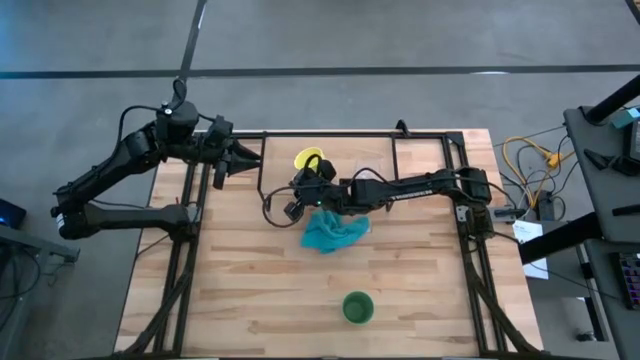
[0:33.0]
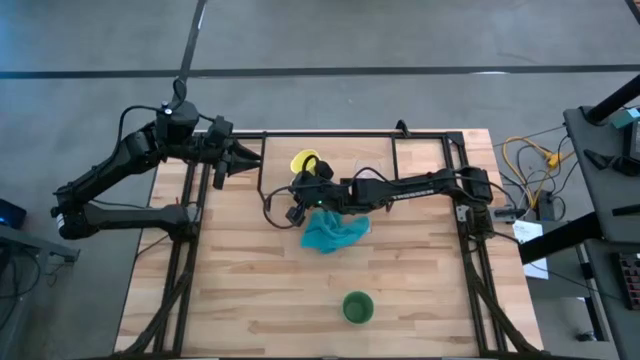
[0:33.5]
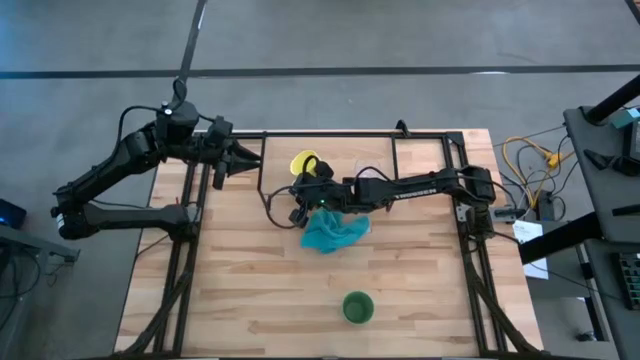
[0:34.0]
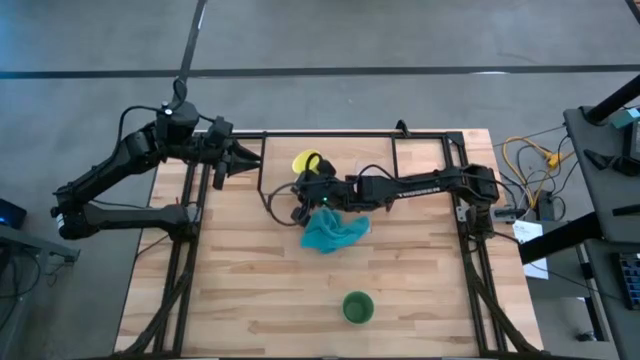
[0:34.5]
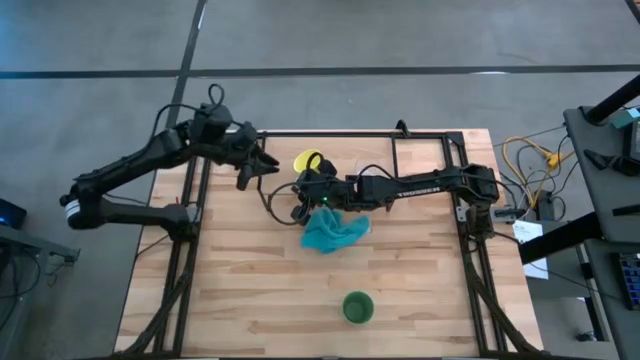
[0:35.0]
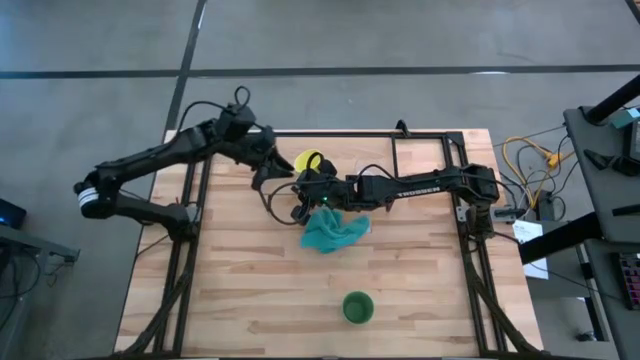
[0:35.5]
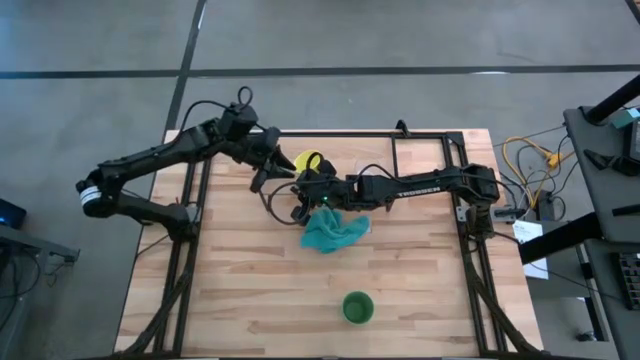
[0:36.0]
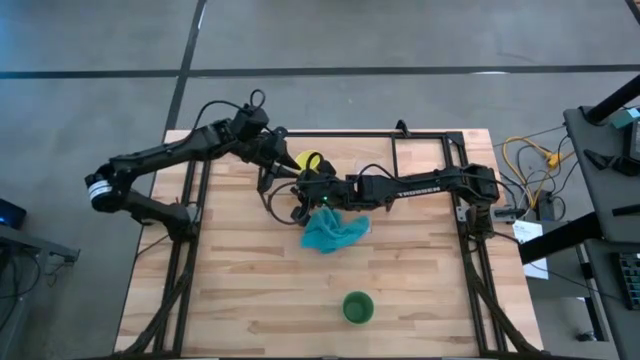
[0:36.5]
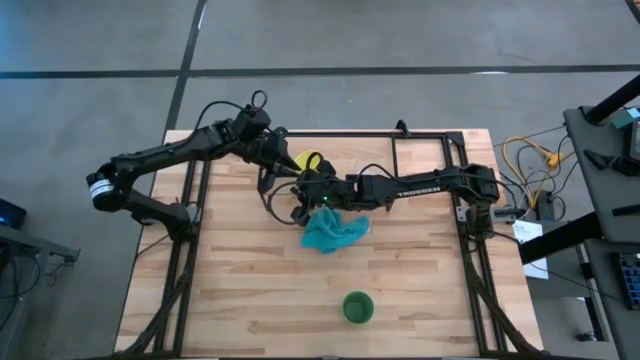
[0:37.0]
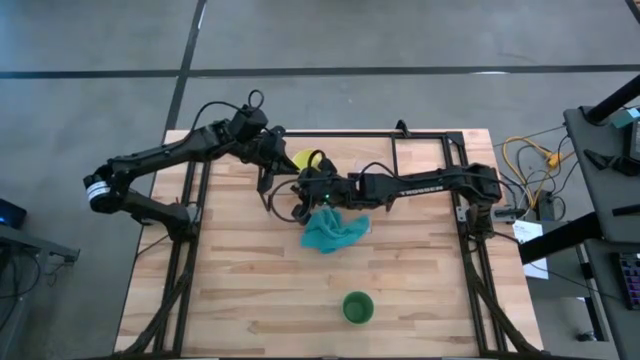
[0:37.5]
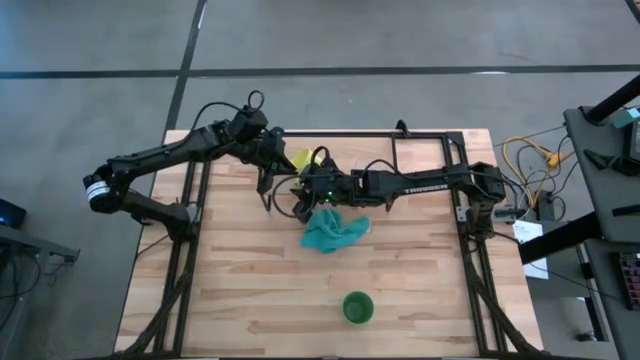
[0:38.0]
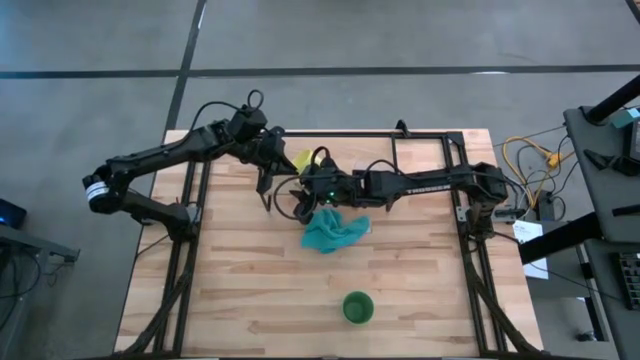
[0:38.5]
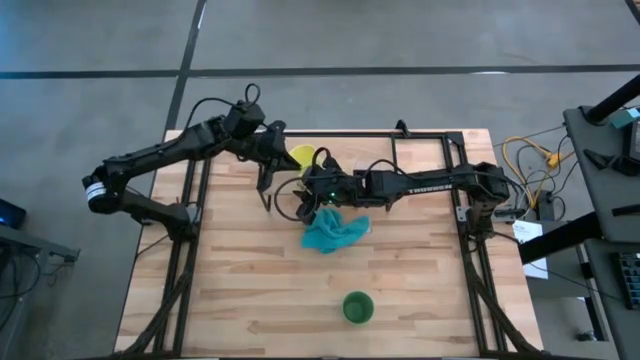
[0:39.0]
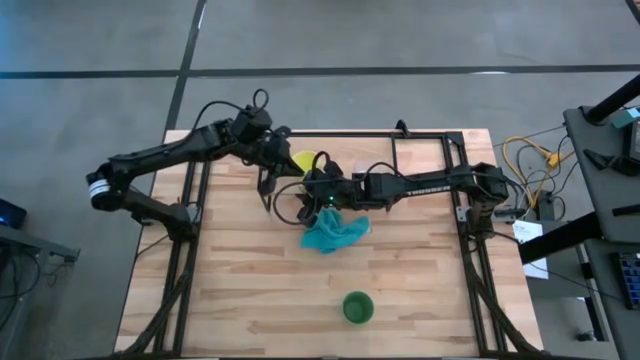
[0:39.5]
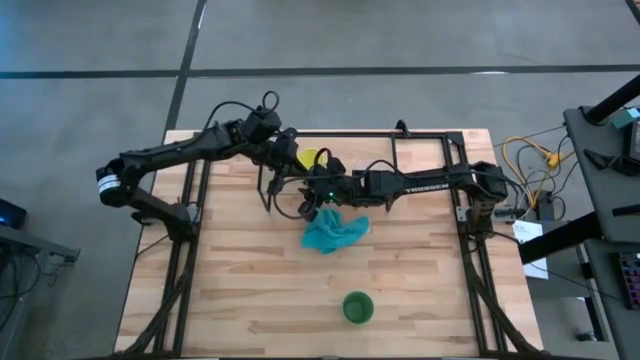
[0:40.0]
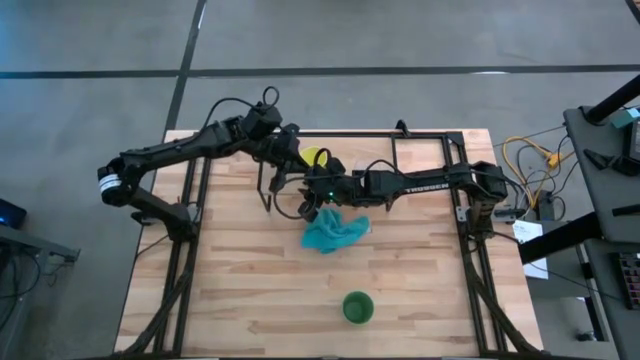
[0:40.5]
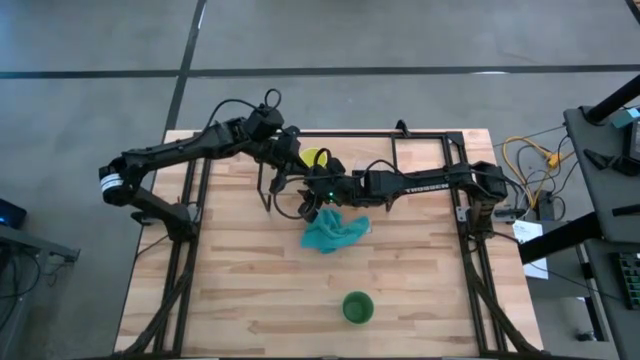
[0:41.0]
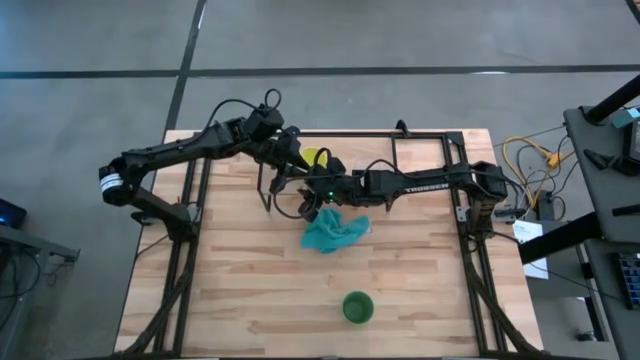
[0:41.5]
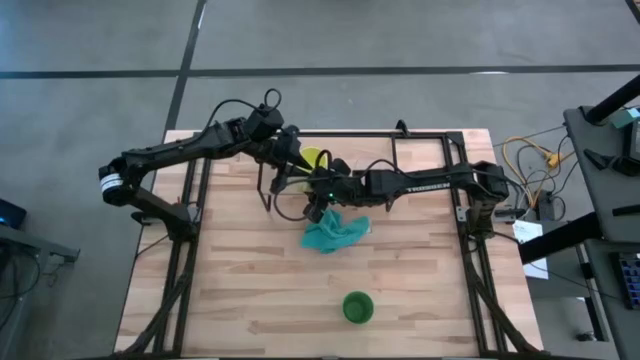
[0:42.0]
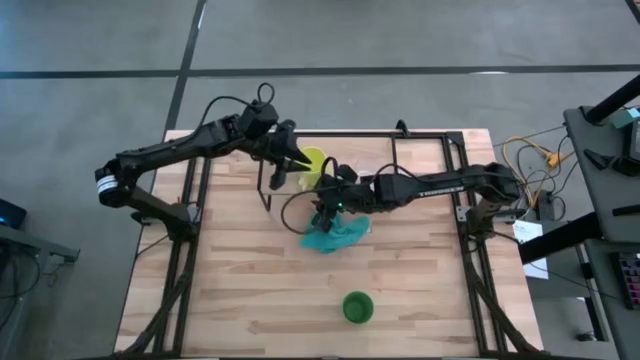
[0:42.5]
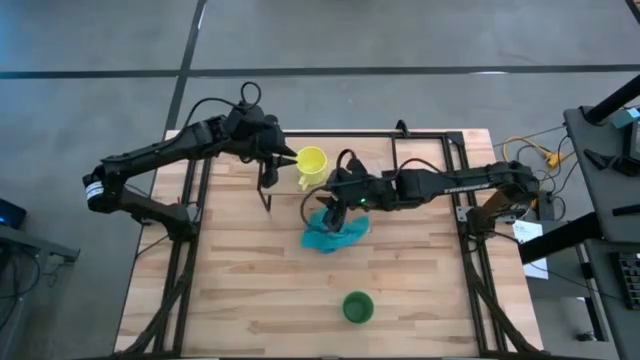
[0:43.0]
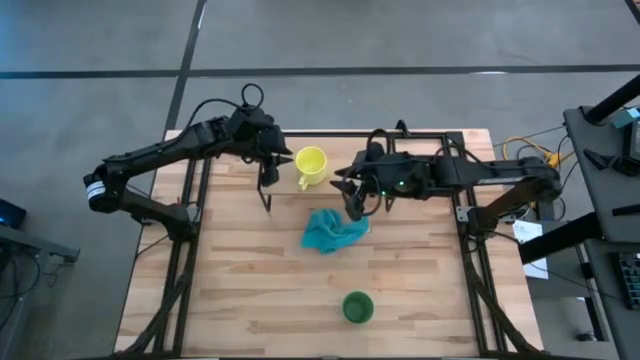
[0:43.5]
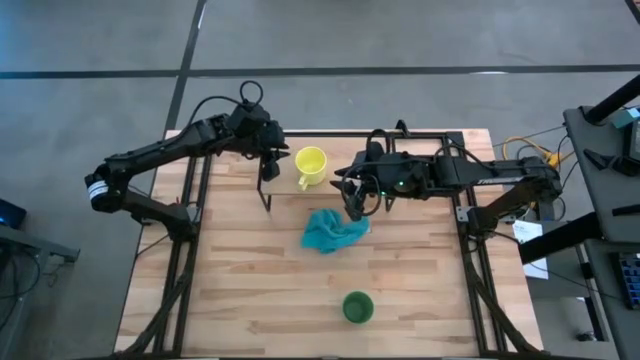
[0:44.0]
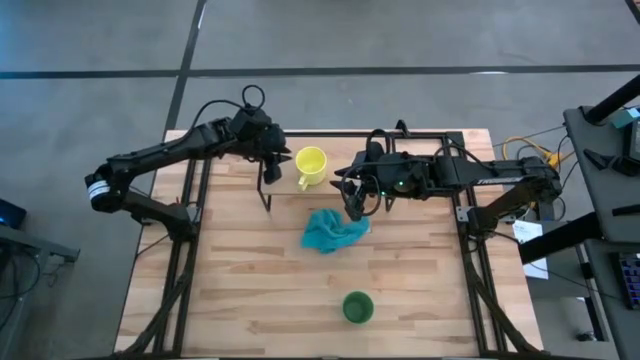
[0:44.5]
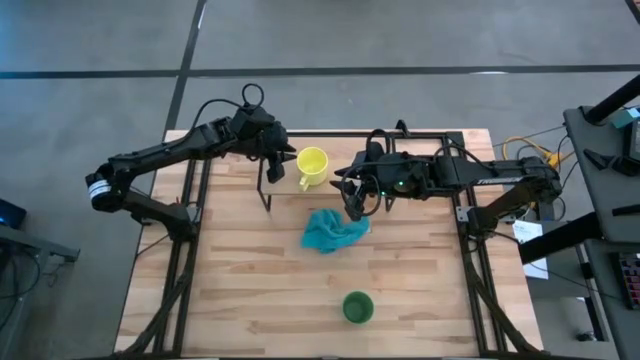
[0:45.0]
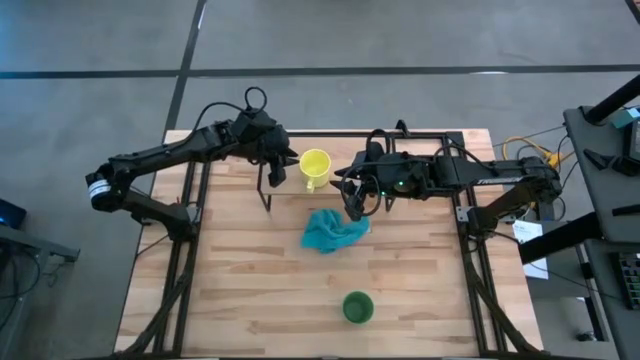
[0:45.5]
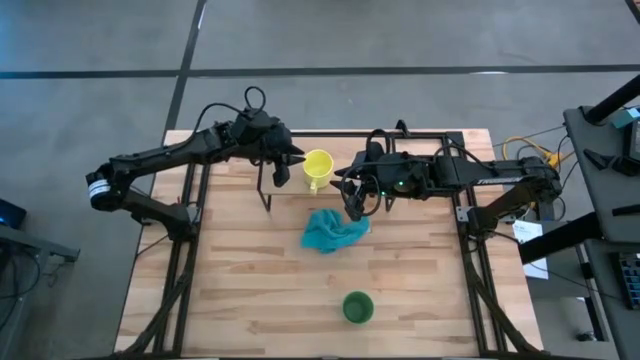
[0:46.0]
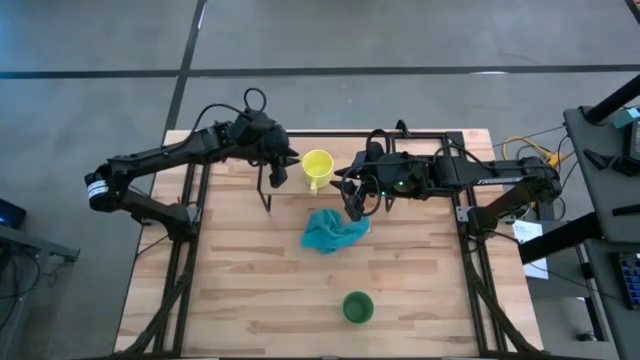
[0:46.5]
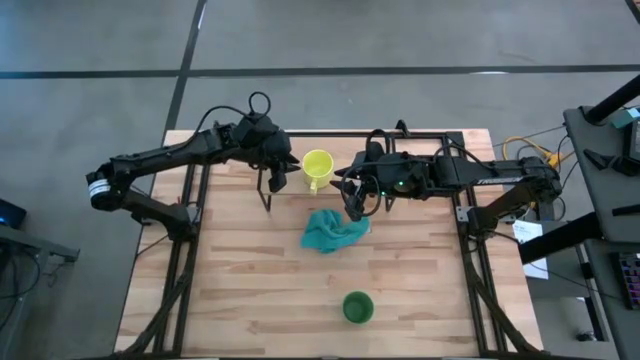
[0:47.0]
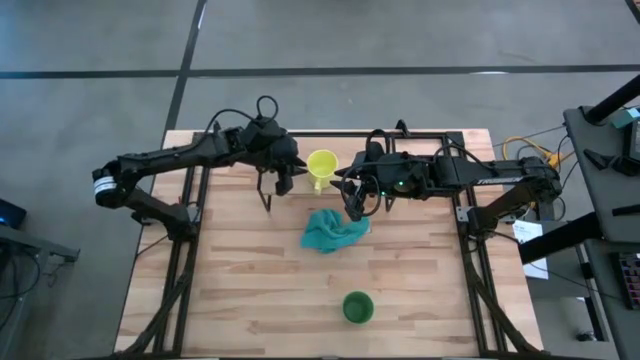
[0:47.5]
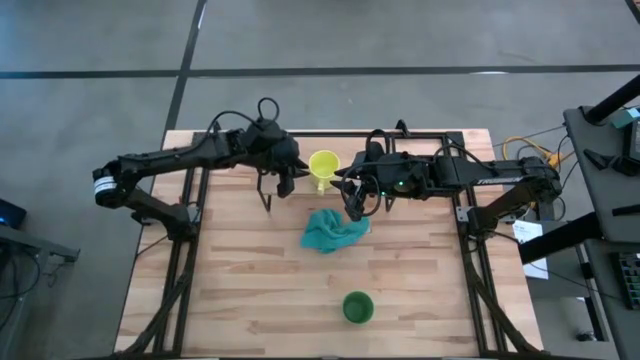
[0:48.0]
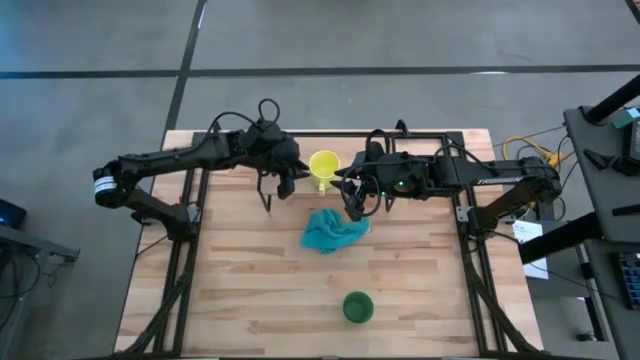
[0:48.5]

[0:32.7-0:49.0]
Task: Stack small to large cups/mugs on shelf
Put the yellow cup on the shelf

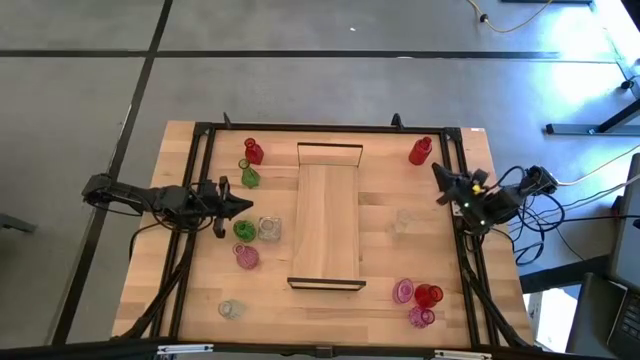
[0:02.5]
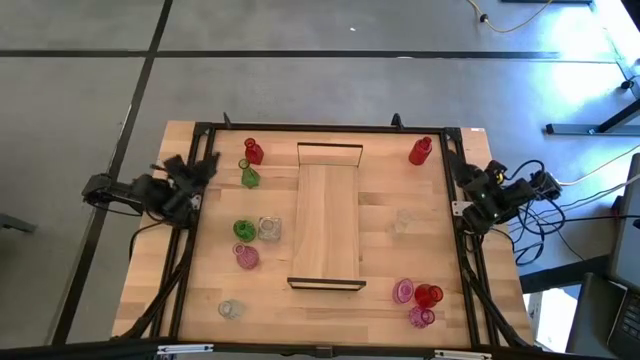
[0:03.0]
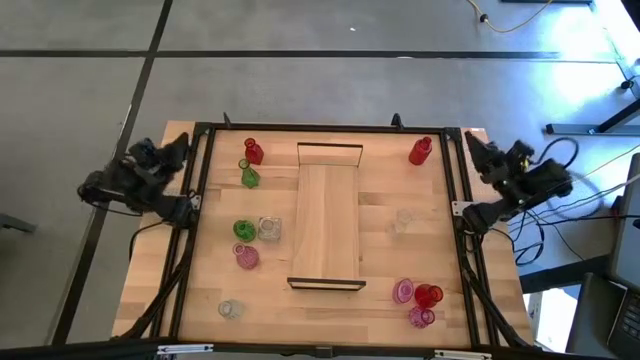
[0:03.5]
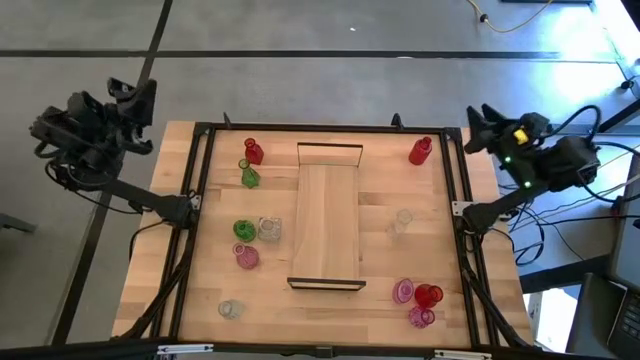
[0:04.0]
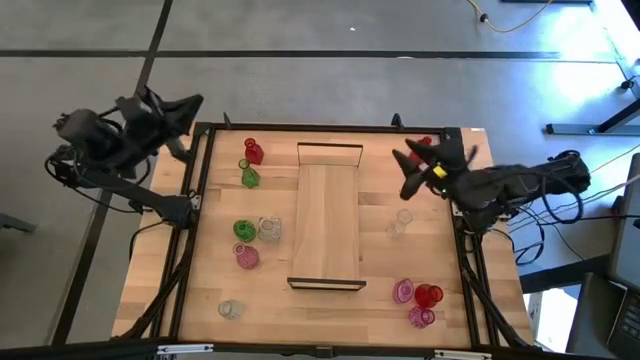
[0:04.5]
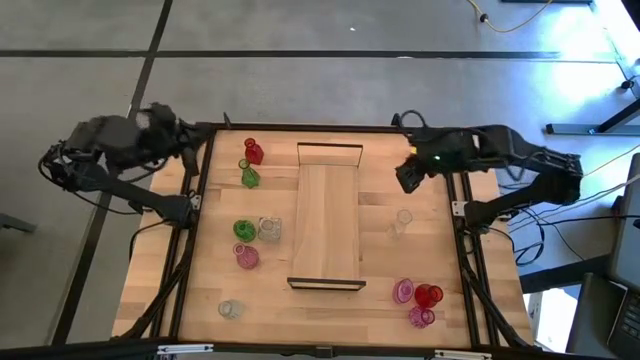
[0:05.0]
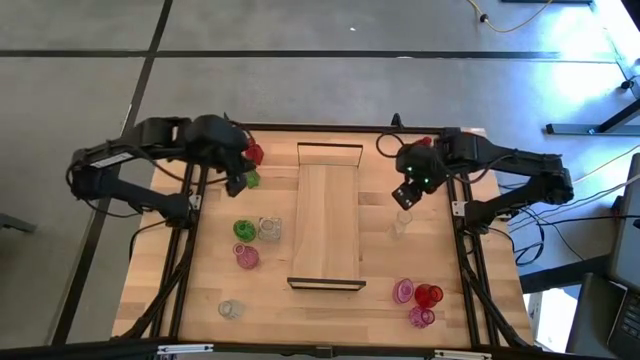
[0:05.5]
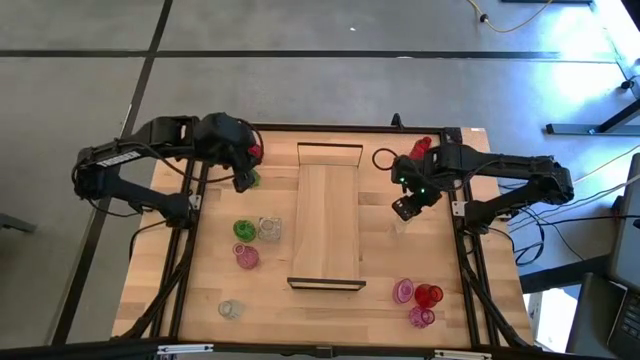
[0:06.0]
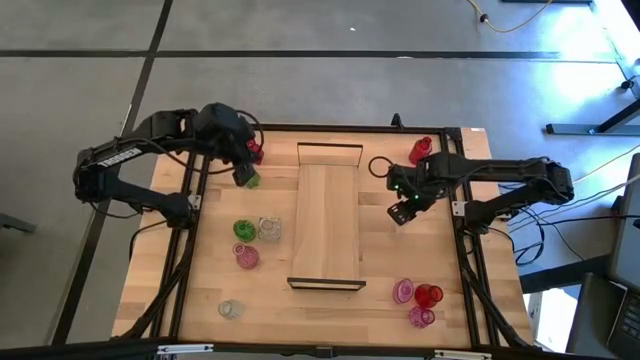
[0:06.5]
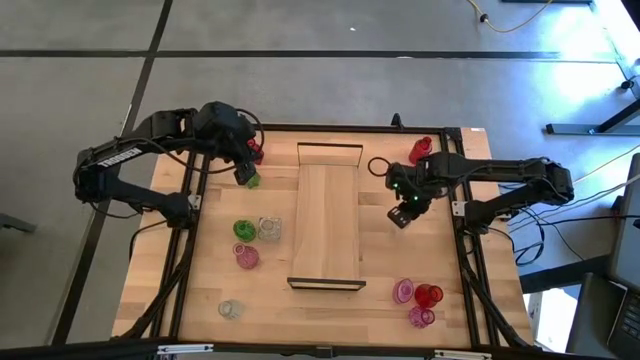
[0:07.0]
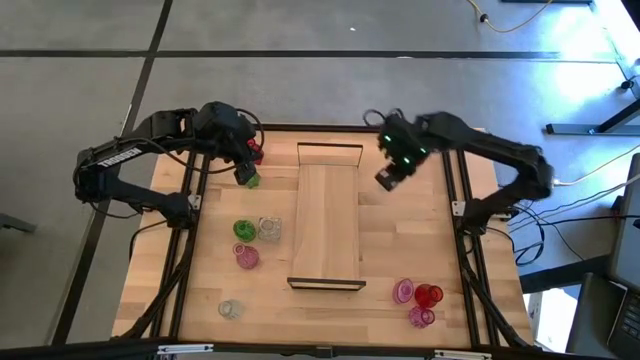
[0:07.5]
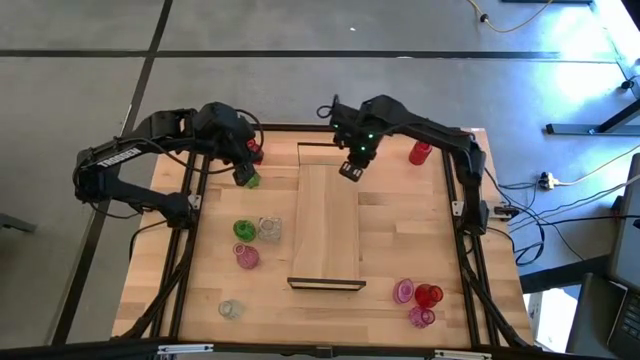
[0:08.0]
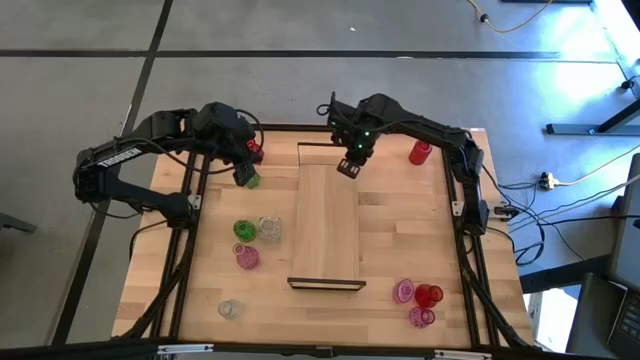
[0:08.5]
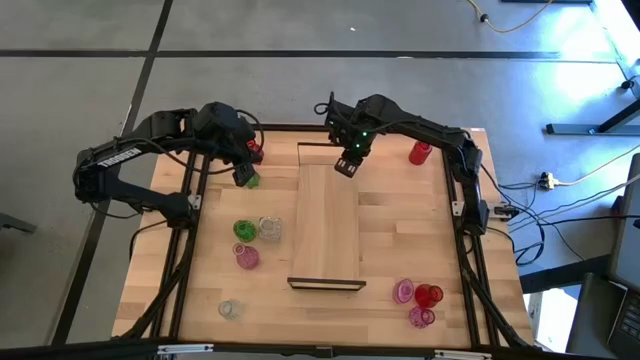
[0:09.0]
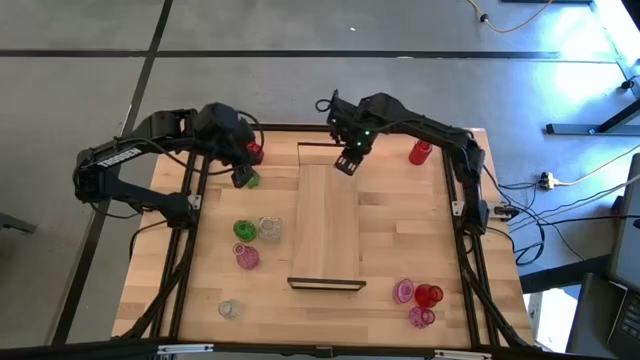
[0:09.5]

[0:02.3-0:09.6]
Task: sort vases onto shelf
Put the top right transparent vase on the shelf
